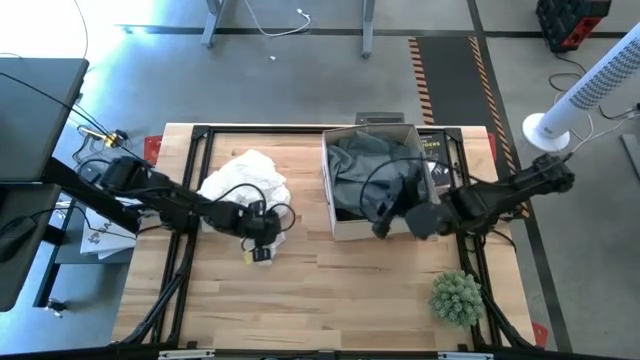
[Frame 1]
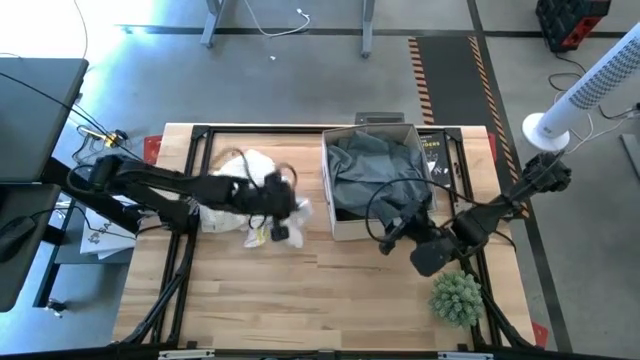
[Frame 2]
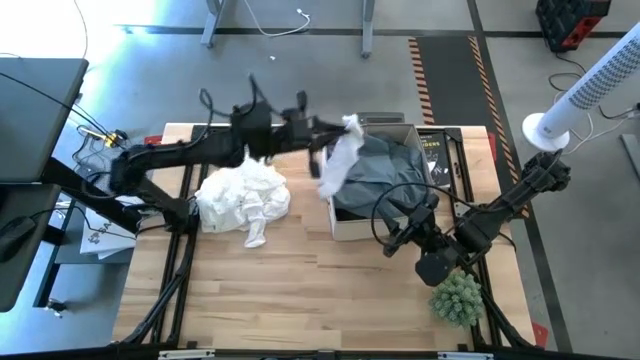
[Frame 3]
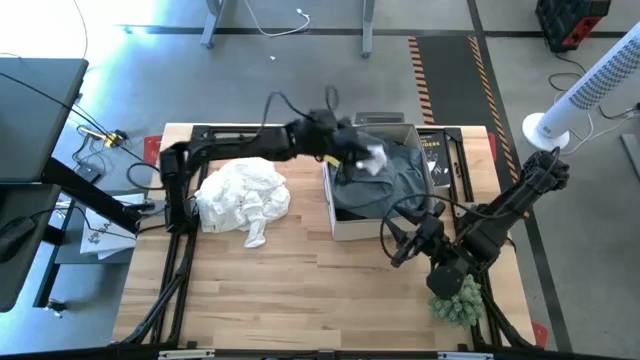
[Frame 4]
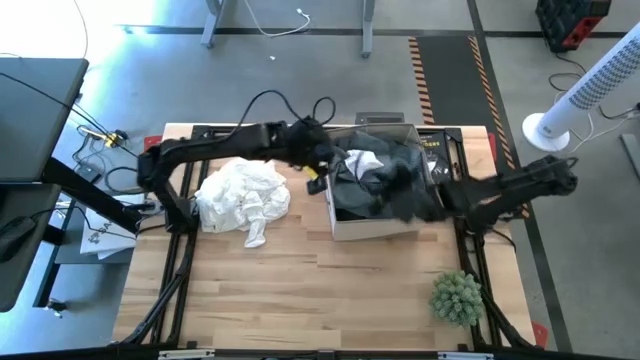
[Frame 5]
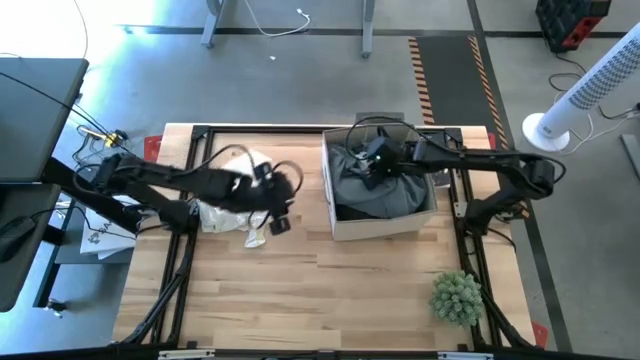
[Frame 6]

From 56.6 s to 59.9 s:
Task: Sort clothes
Put the white sock into the laundry organizer

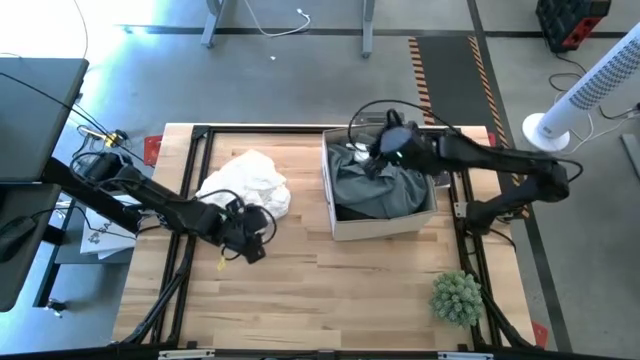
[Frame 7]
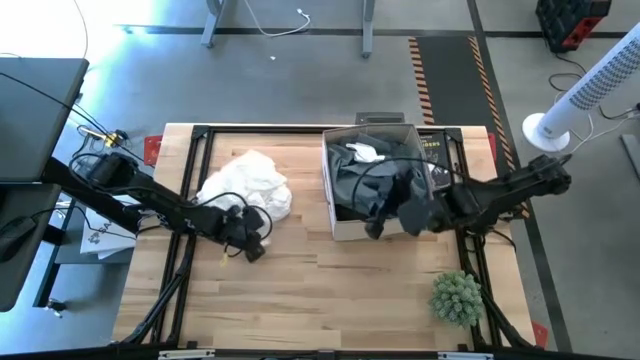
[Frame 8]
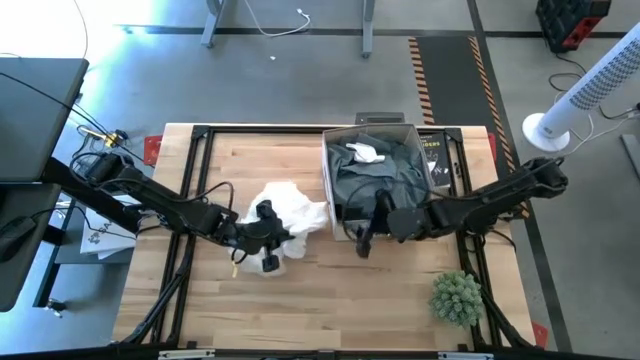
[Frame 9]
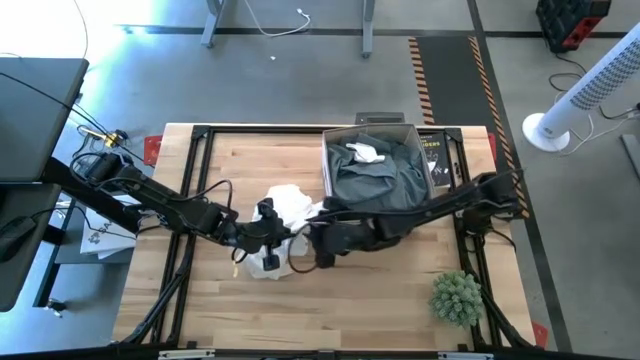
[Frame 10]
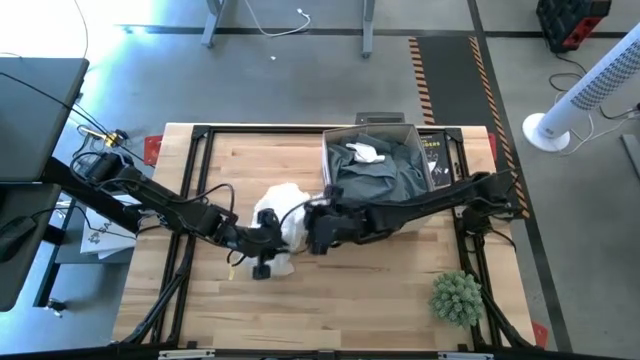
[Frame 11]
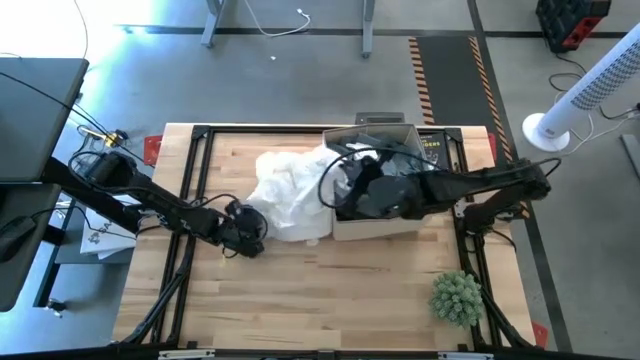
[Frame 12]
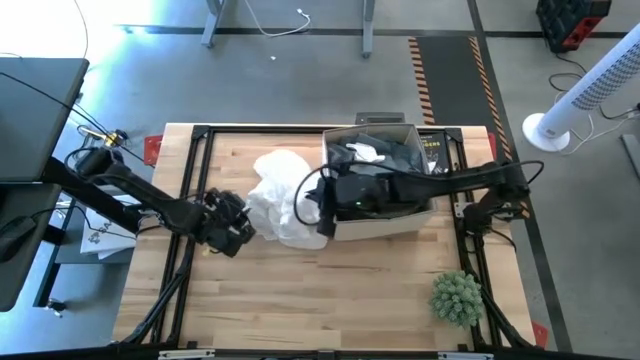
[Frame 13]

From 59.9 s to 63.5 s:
Put the white sock into the laundry organizer

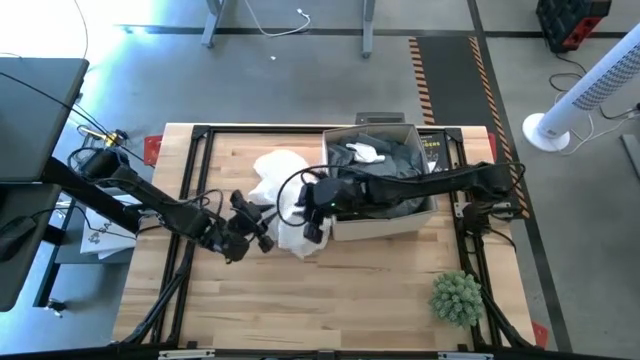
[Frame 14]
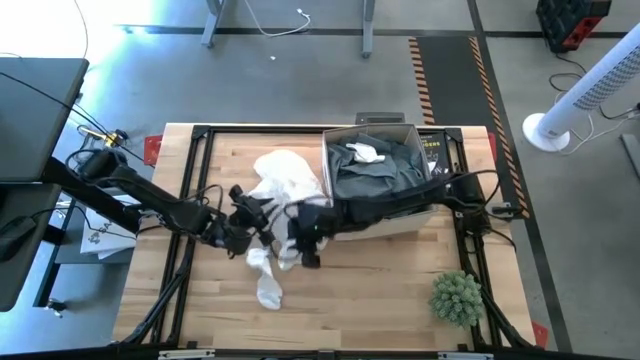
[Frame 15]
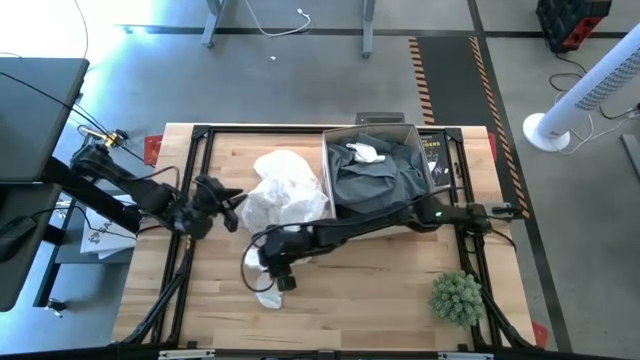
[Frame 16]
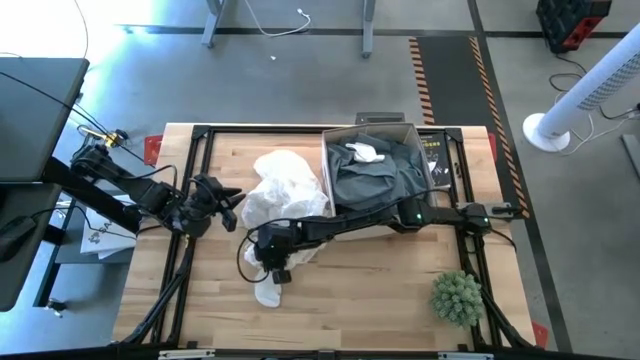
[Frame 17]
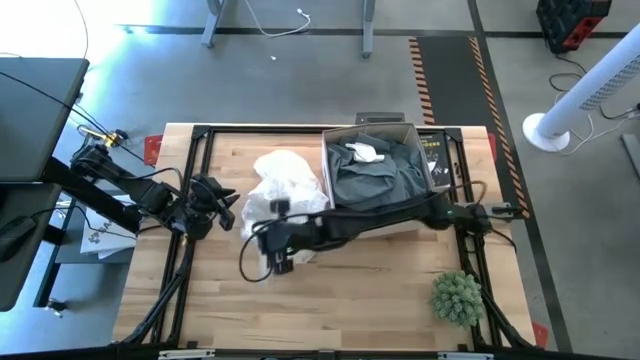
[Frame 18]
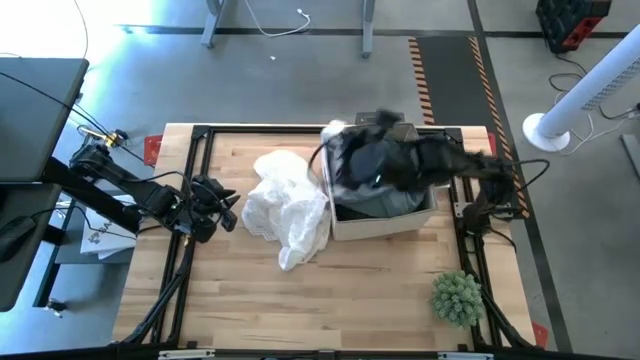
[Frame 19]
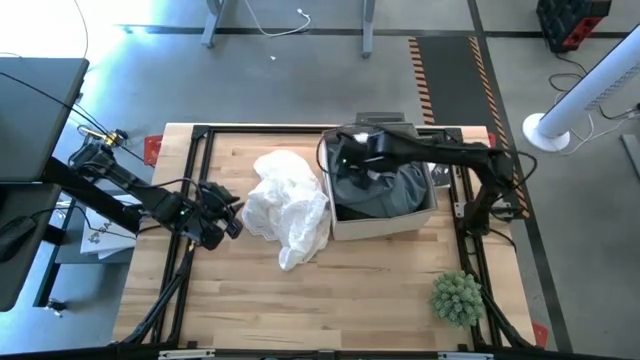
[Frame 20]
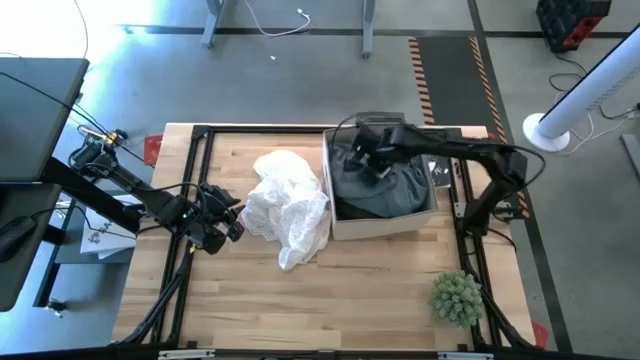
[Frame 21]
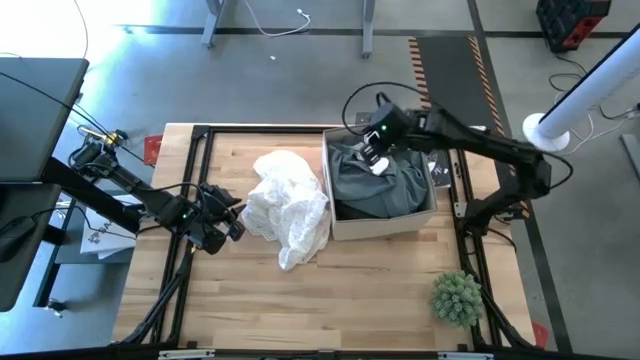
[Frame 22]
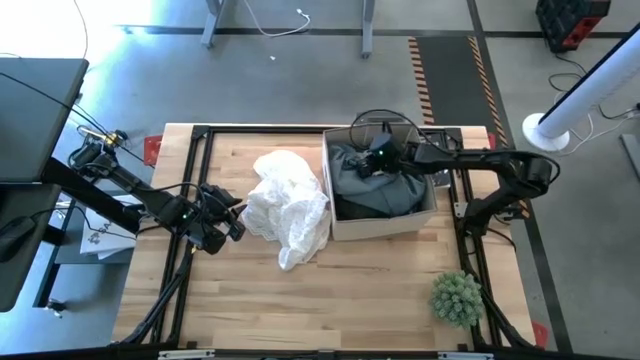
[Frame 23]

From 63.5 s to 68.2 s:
Put the white sock into the laundry organizer

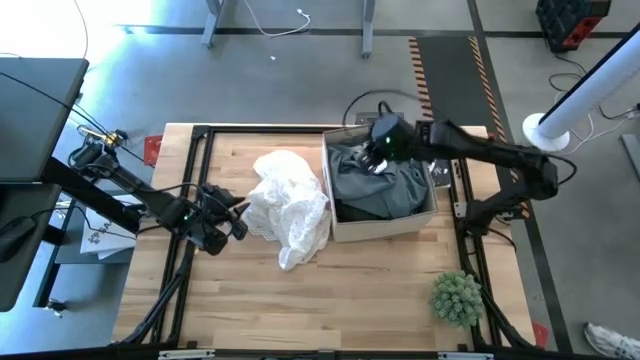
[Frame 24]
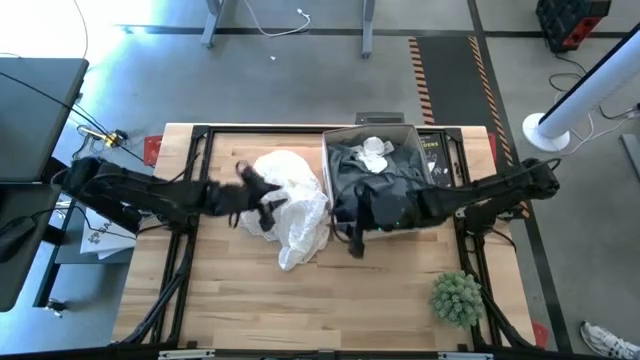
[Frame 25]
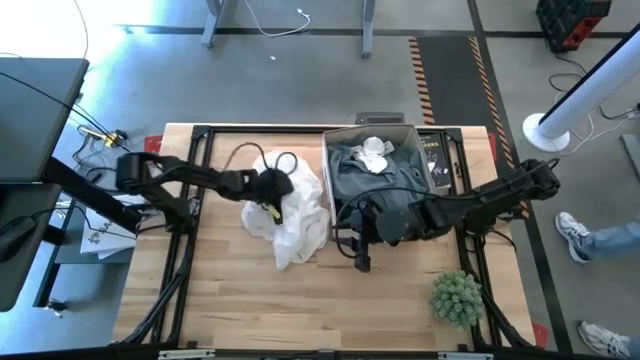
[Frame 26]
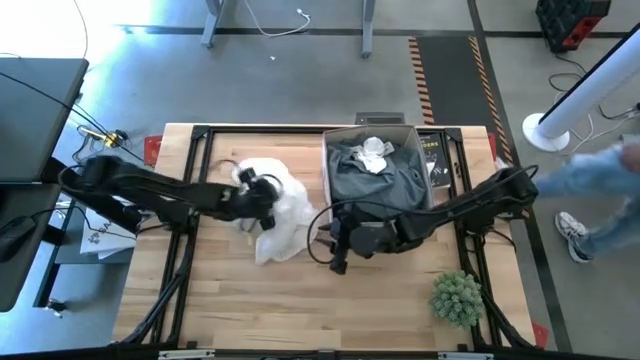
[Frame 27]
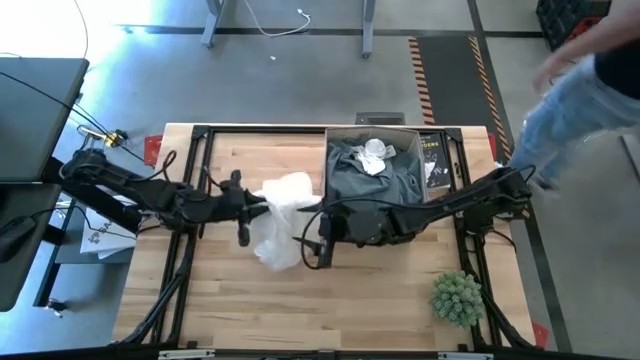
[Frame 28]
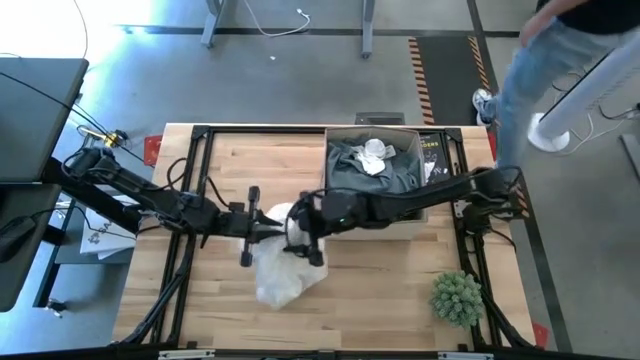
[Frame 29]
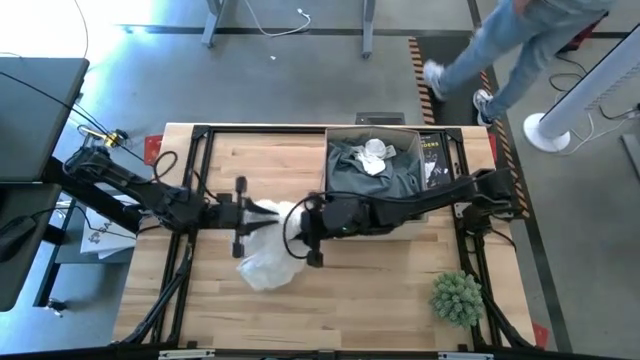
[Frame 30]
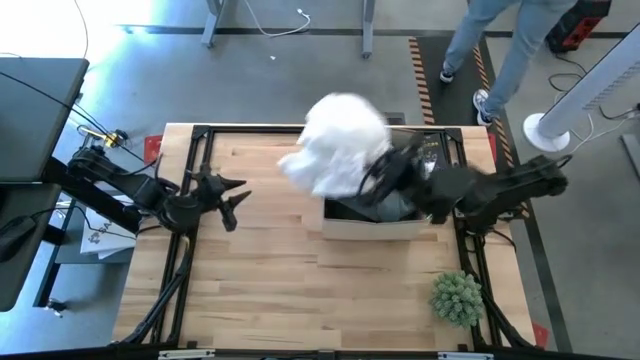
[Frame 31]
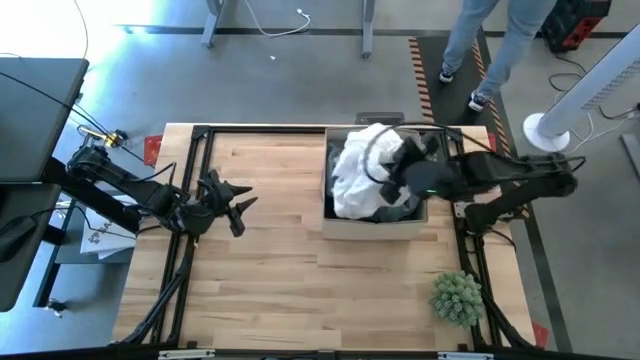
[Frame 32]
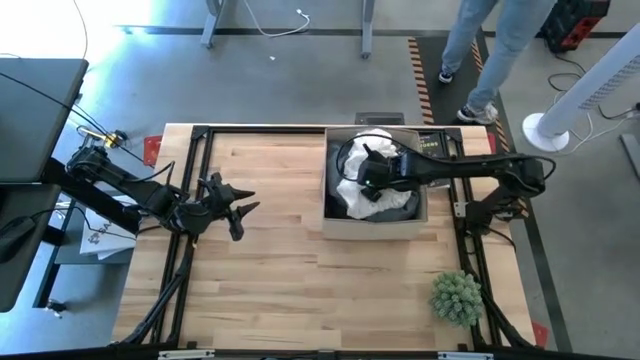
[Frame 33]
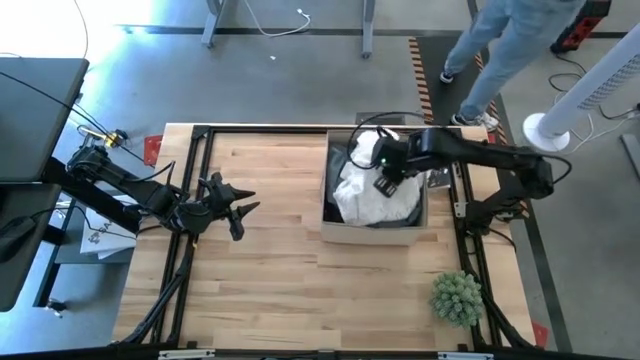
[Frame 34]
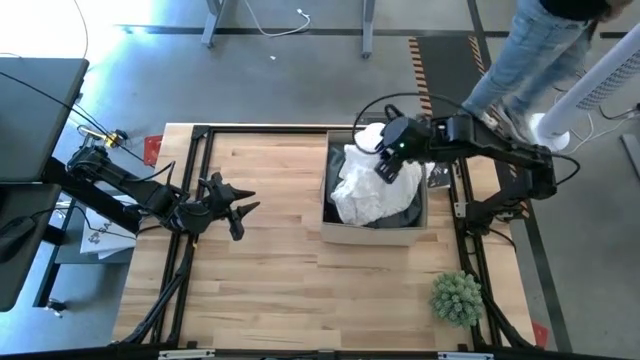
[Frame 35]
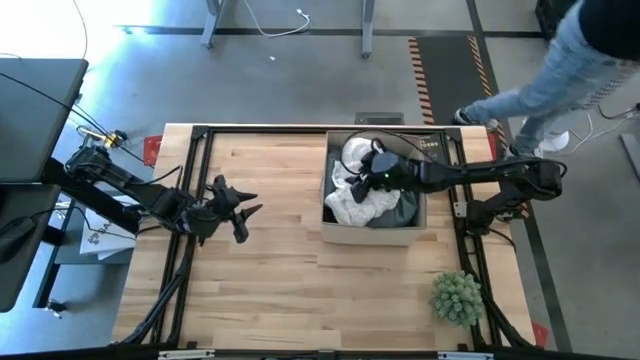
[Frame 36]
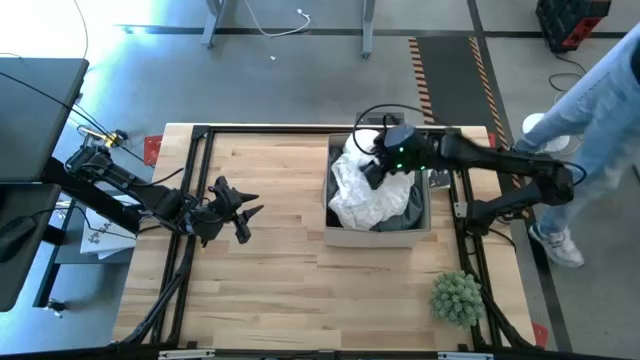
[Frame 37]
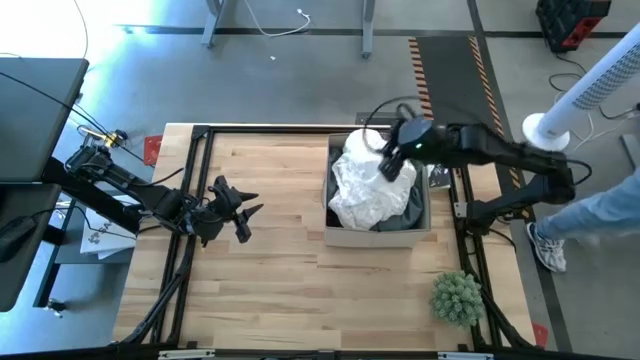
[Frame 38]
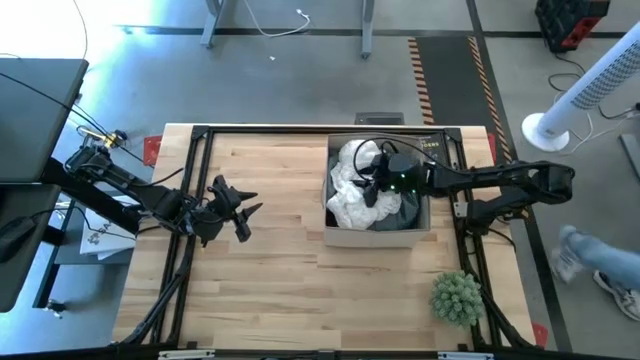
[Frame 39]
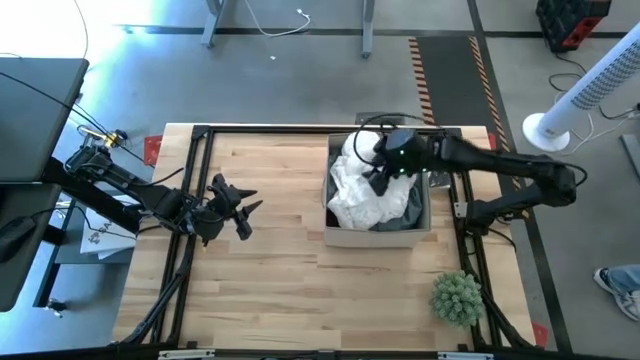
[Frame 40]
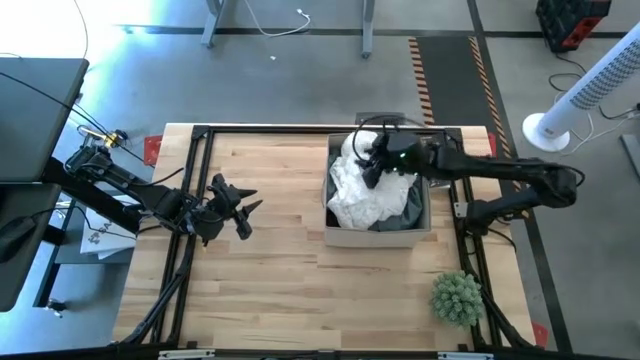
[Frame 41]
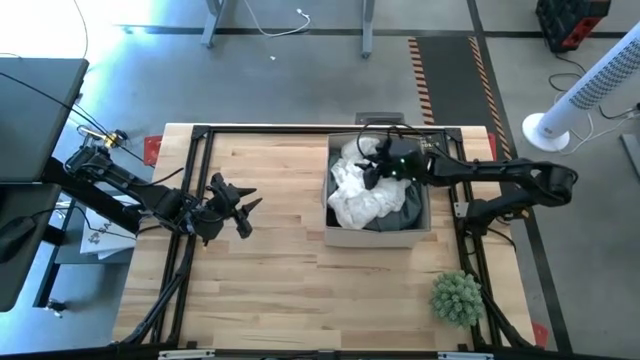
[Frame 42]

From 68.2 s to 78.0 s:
Put the white blouse into the laundry organizer

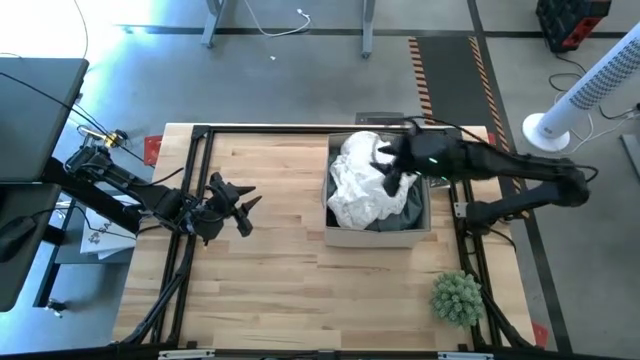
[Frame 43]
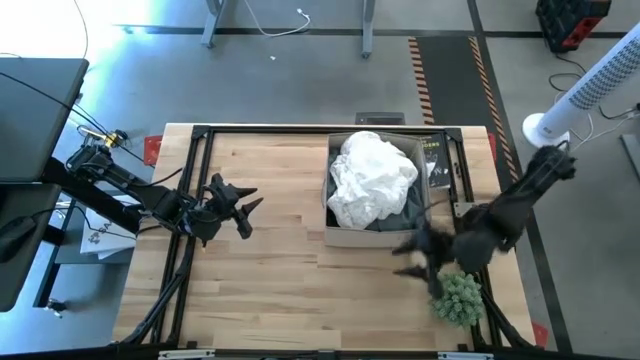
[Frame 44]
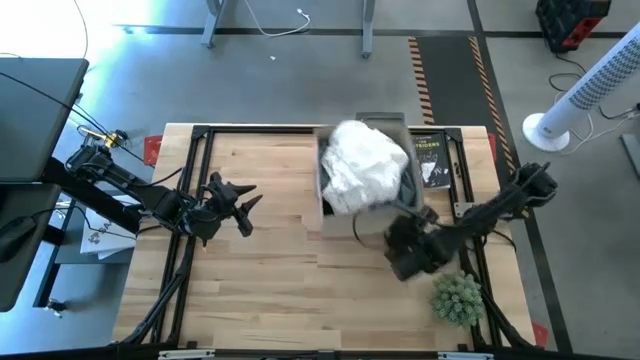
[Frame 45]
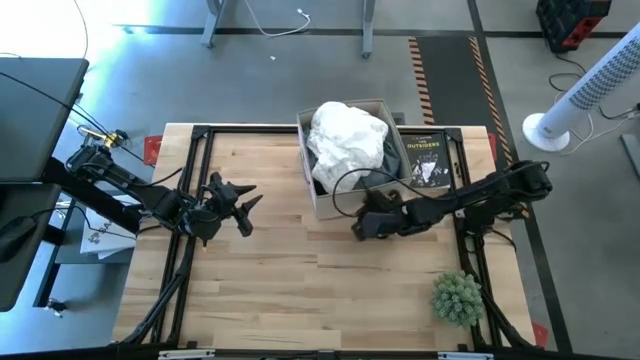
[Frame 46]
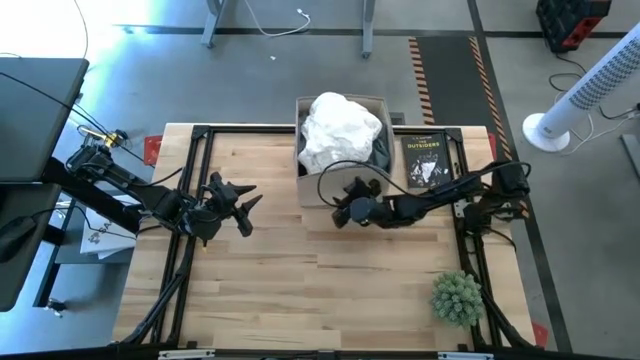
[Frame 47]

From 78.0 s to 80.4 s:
Move the laundry bin to the top center of the table
